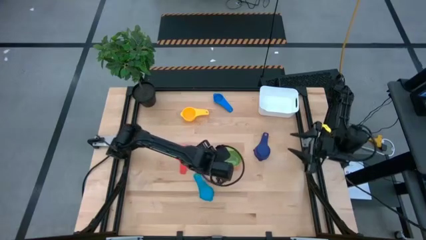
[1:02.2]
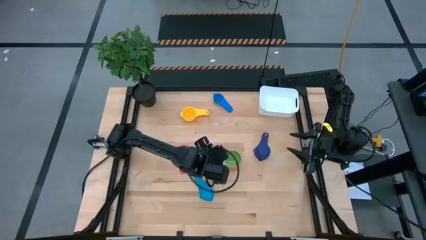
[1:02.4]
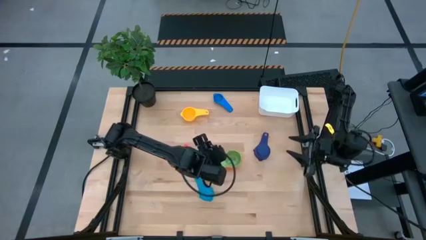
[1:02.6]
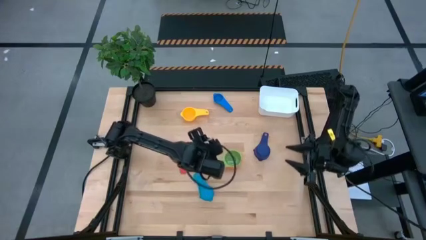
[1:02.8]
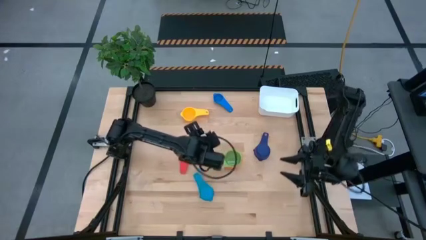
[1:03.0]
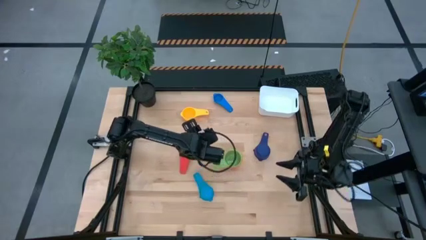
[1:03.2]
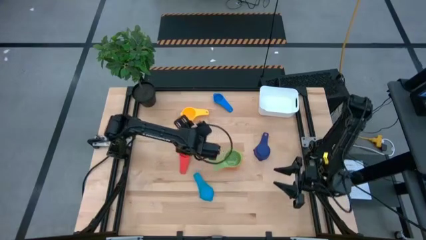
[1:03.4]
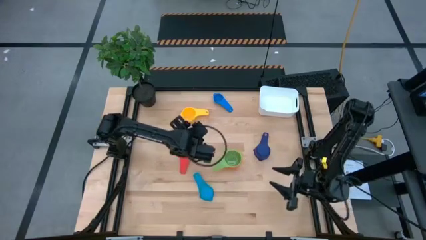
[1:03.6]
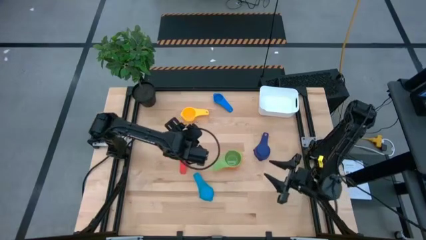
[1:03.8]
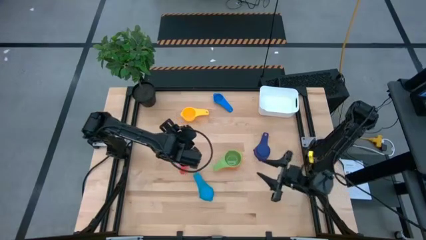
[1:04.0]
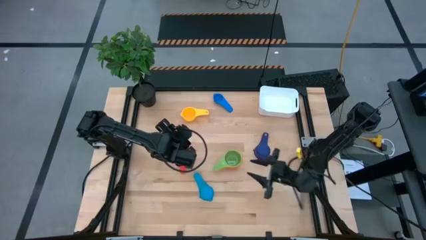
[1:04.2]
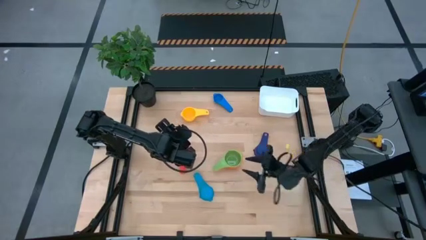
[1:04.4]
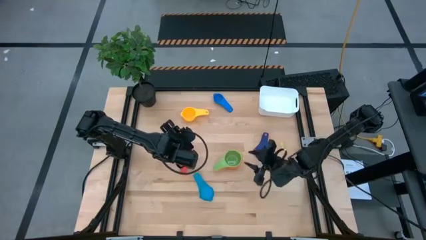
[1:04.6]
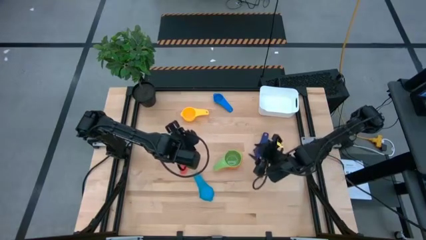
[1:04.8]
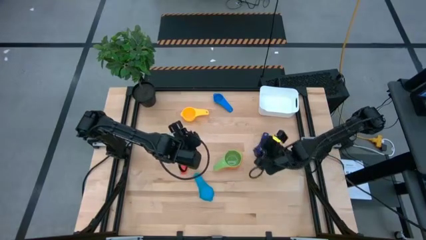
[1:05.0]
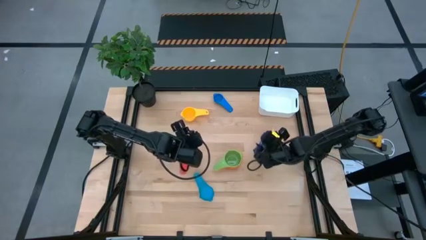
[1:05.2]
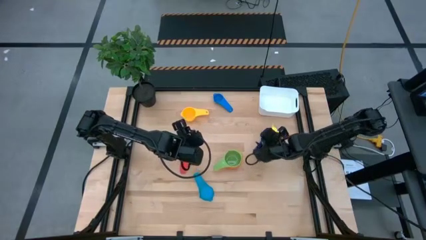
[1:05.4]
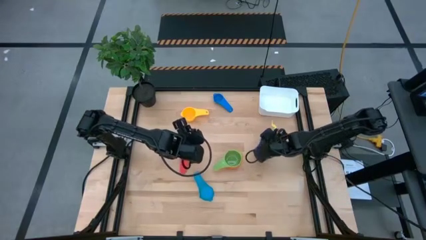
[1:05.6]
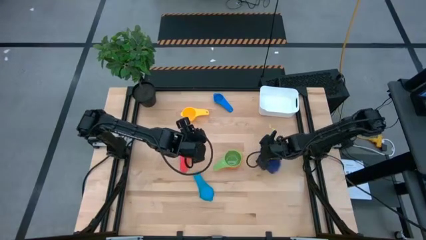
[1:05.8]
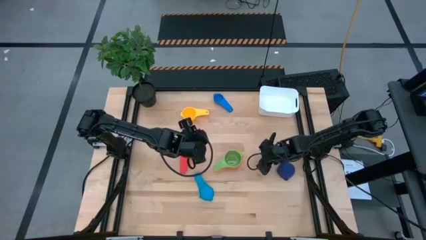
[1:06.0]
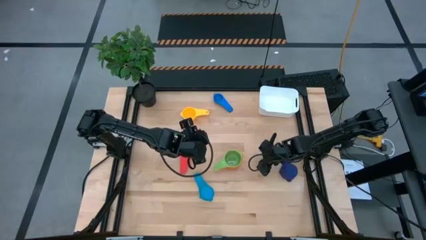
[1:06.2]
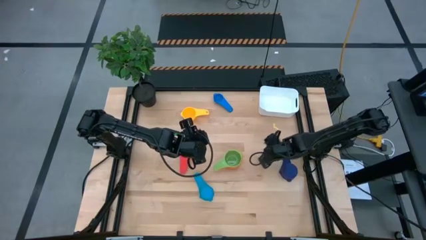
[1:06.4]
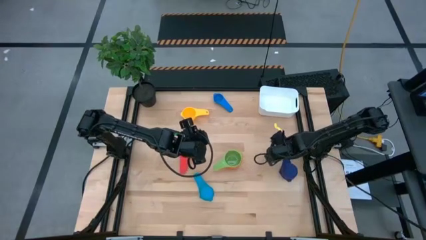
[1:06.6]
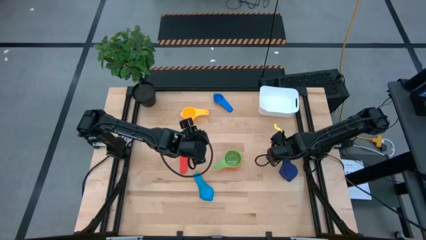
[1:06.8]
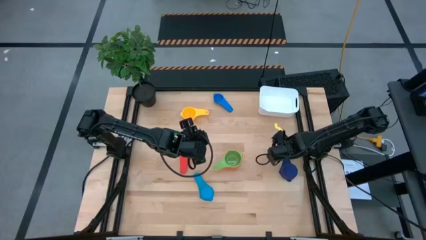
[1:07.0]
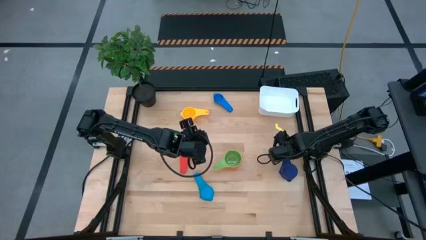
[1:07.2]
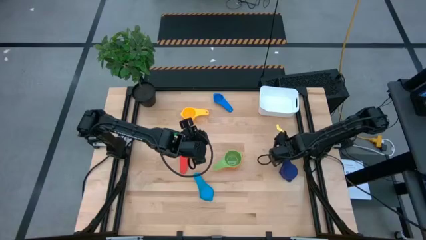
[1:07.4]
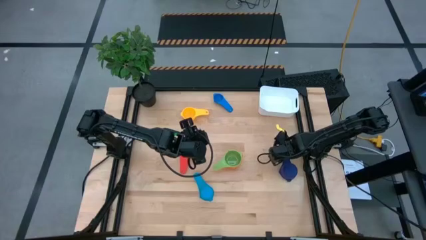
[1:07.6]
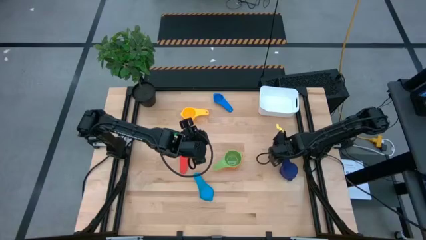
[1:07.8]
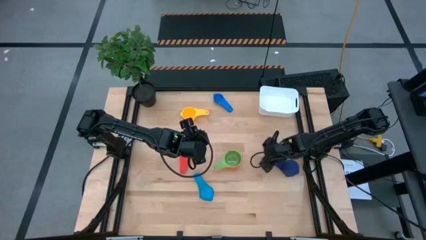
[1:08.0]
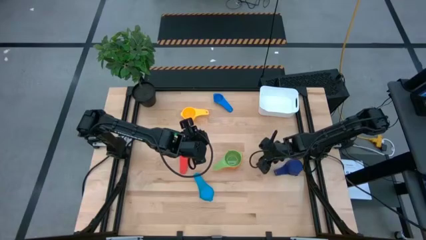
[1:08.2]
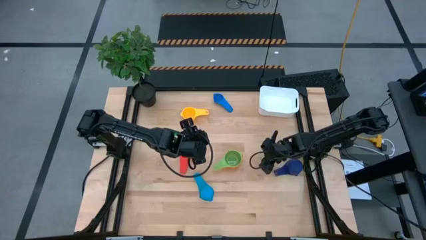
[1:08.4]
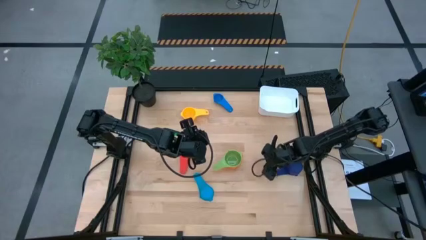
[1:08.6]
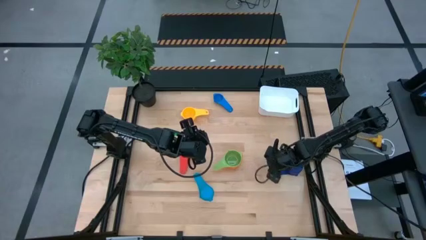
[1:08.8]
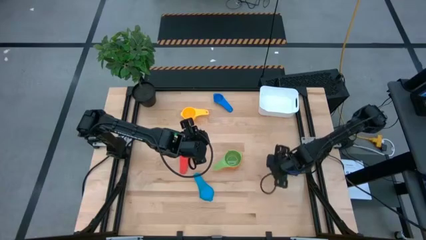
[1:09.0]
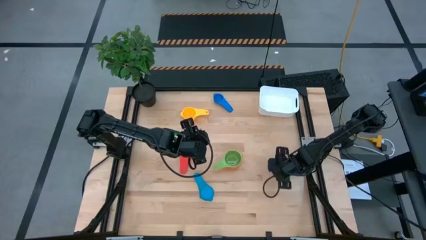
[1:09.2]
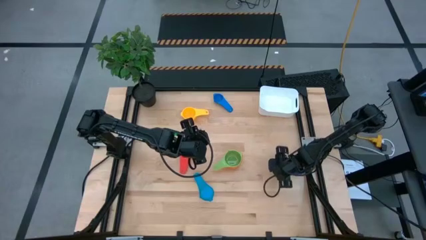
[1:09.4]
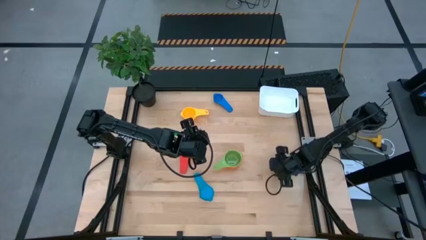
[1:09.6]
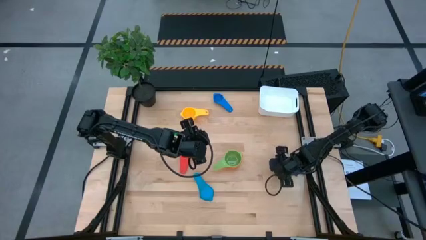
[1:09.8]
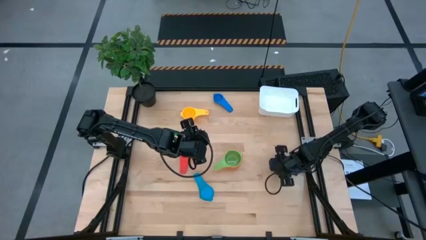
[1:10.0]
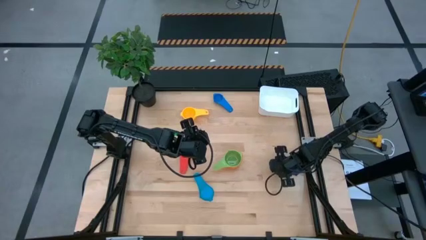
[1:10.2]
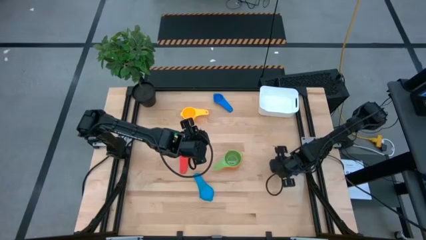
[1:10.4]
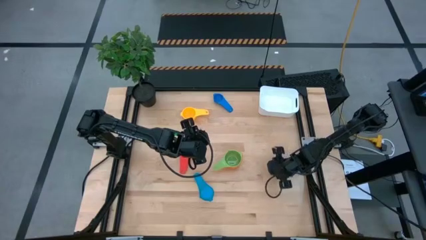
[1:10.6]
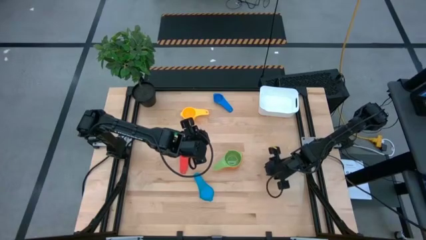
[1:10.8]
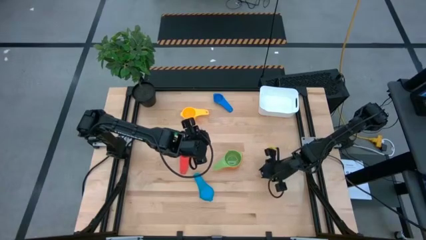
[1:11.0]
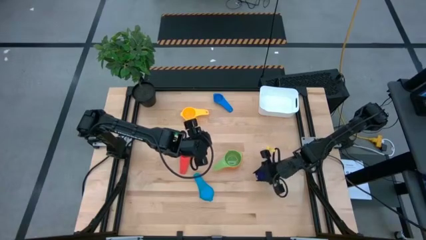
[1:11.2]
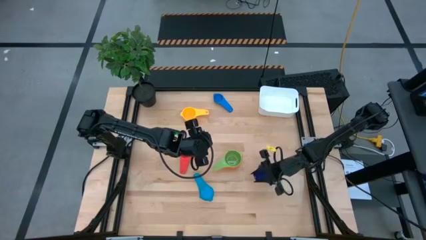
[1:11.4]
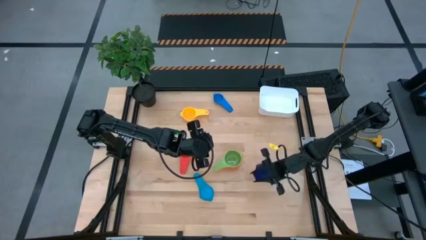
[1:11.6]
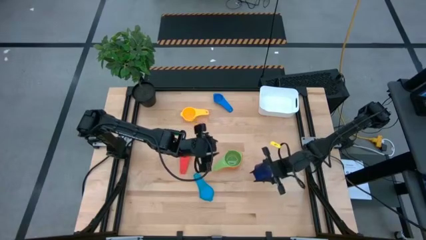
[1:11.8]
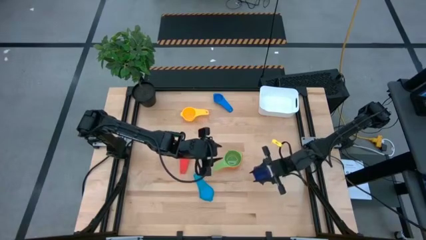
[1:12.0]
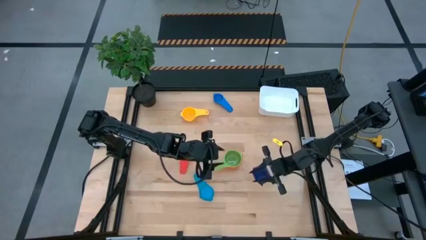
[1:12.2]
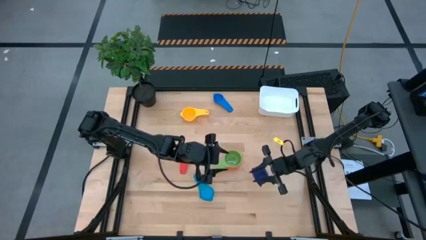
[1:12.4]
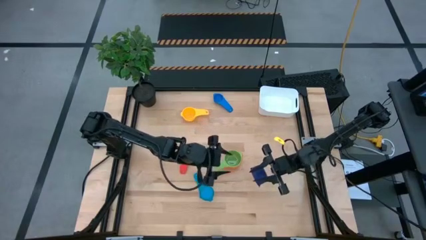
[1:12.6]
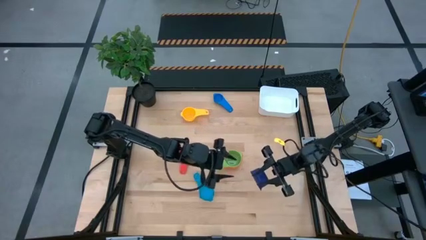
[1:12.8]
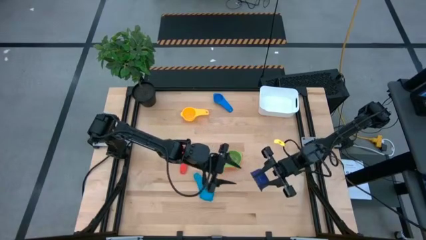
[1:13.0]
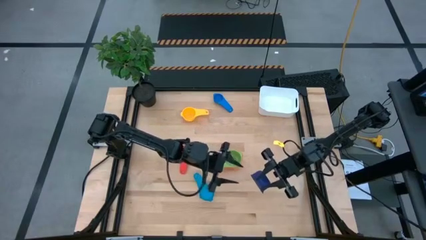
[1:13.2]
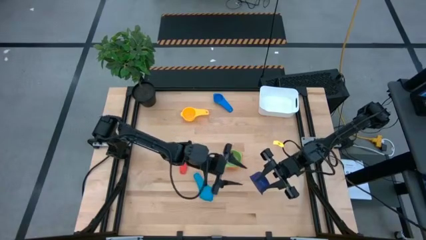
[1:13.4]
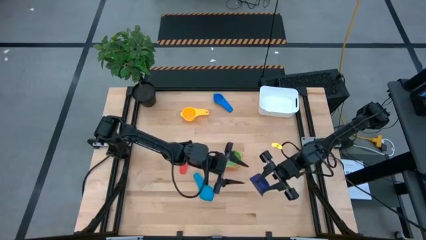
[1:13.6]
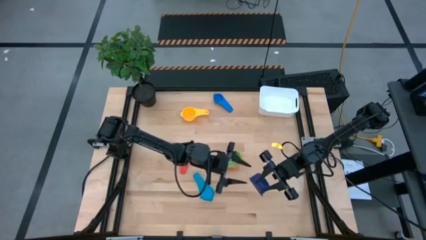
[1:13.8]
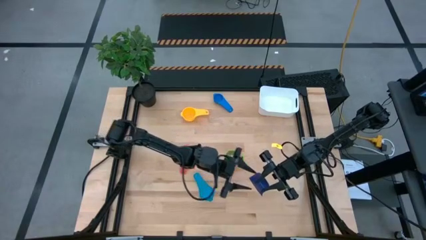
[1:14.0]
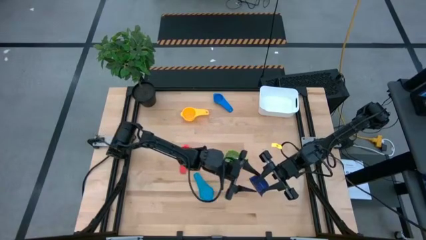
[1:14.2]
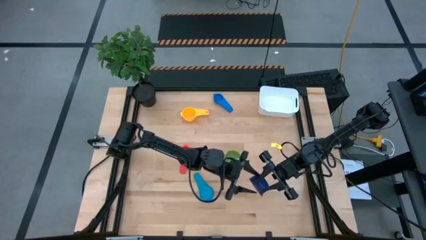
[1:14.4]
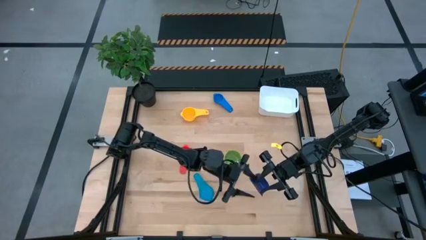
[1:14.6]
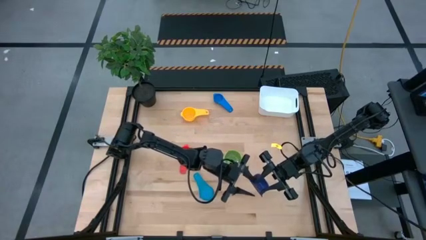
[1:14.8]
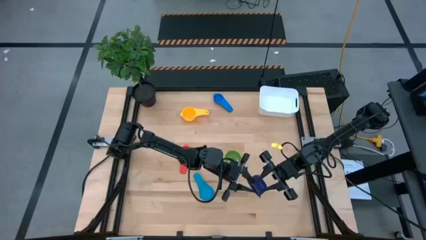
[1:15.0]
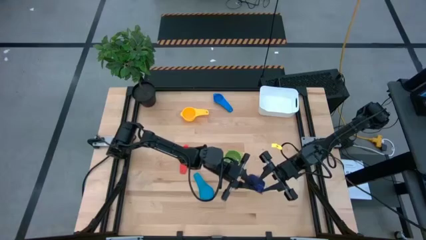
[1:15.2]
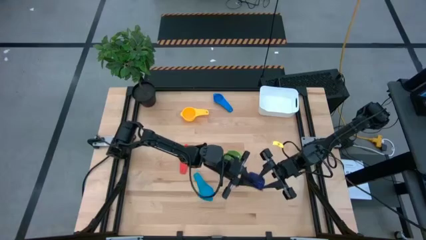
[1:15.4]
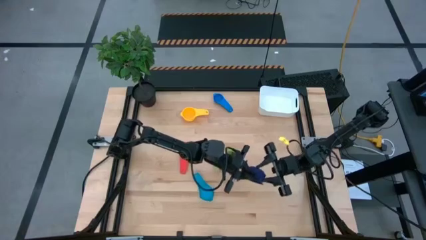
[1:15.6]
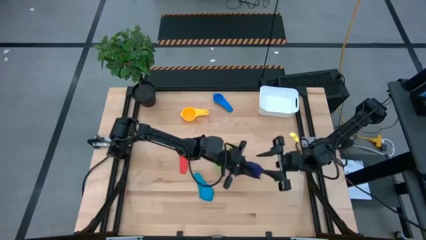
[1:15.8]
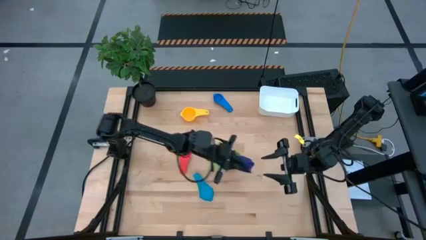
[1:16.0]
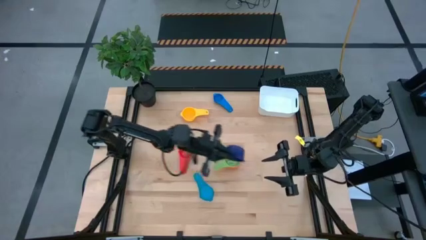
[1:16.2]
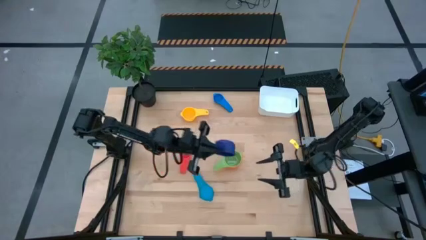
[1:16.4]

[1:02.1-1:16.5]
Task: Nest measuring cups in basket
Stack the purple measuring cup on top of the green measuring cup

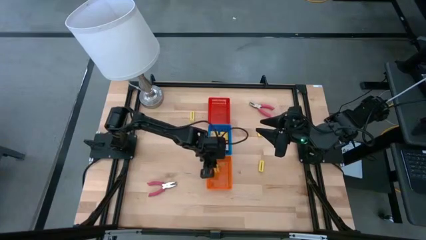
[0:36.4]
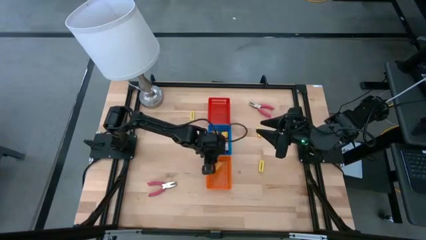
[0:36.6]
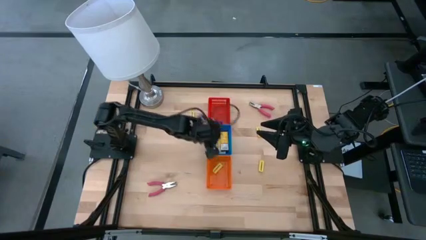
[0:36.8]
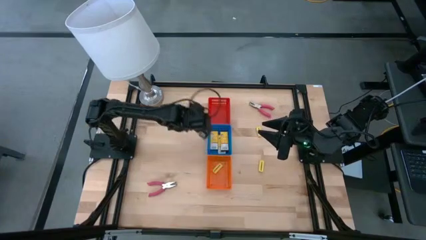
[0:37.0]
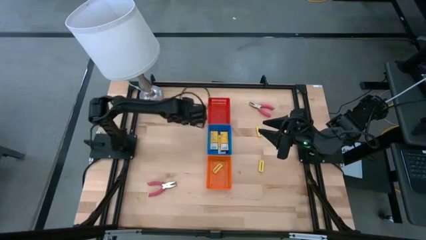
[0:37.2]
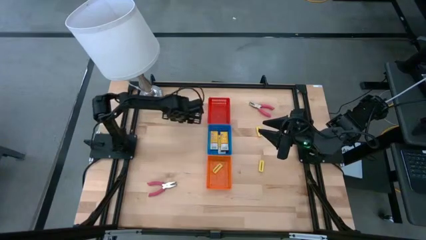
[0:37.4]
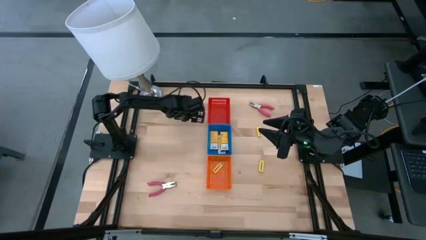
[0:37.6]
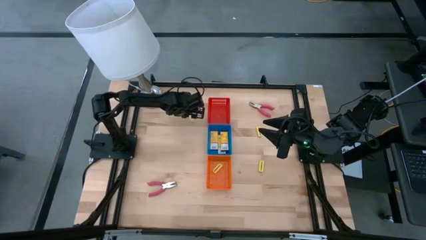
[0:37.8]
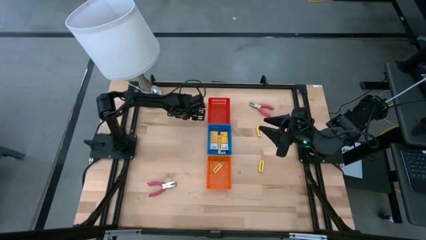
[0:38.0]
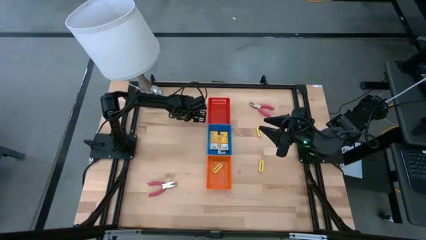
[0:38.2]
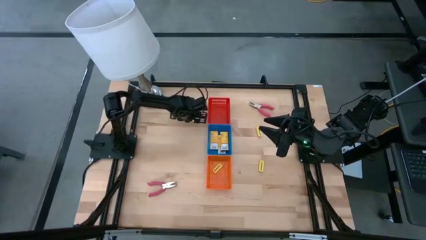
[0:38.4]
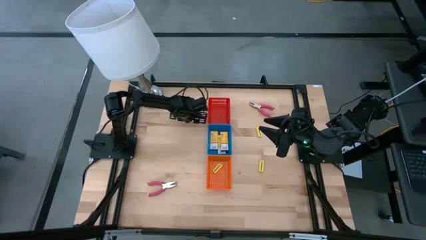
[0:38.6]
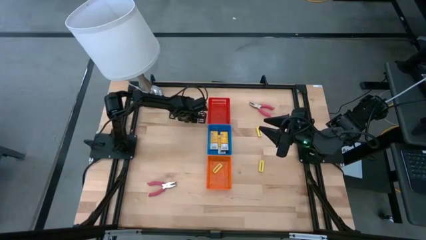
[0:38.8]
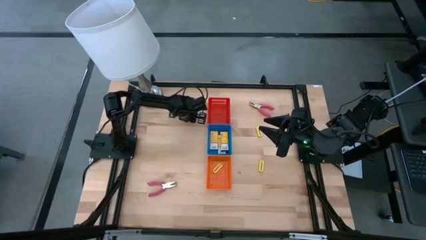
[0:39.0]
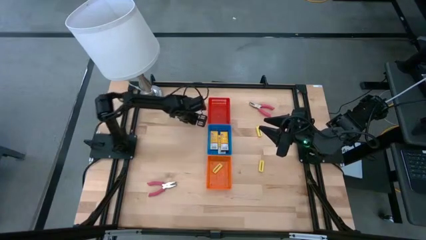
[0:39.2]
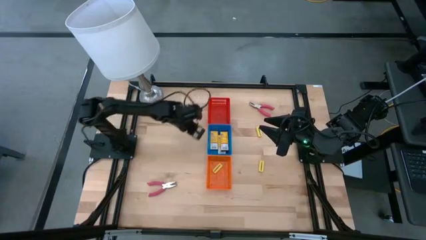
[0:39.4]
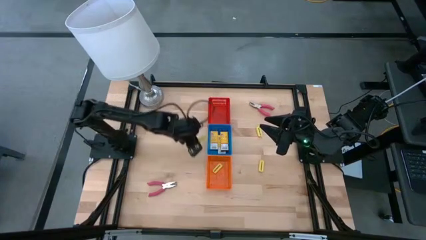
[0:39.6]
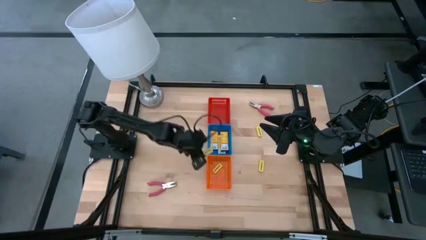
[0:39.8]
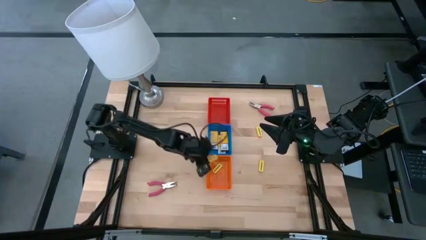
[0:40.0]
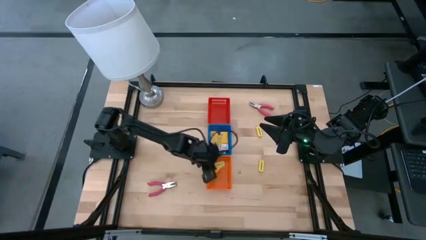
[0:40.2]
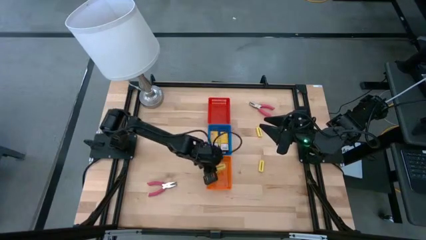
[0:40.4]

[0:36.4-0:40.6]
Task: Pick & Place School Supplies
Put the yellow eraser into the orange bin
